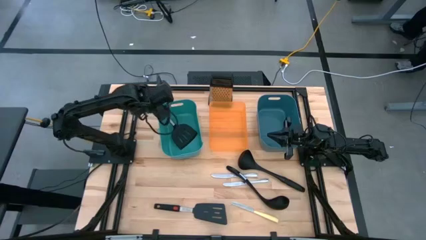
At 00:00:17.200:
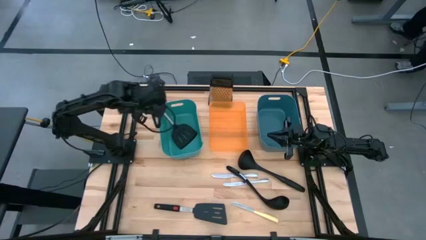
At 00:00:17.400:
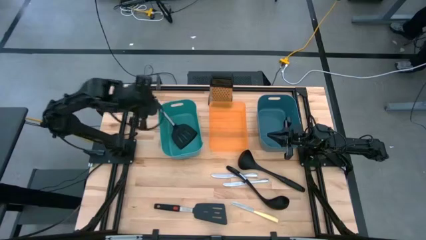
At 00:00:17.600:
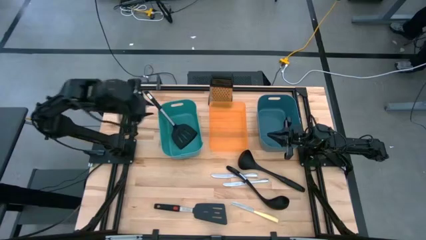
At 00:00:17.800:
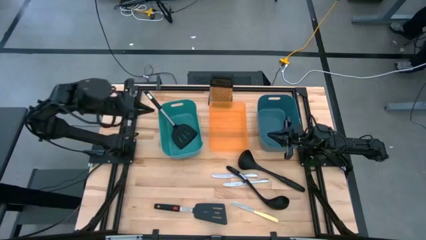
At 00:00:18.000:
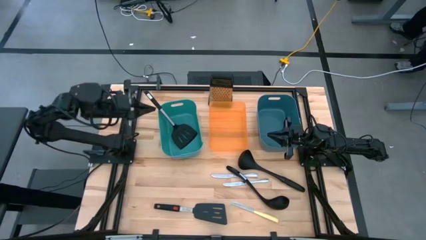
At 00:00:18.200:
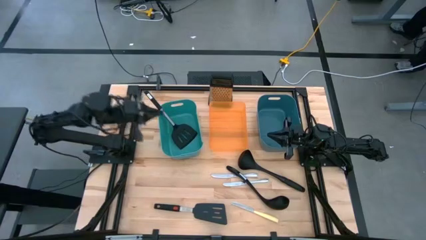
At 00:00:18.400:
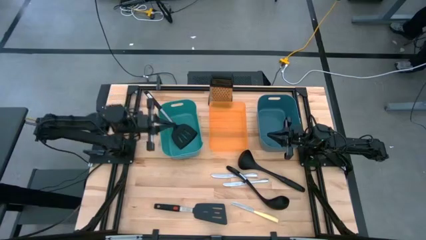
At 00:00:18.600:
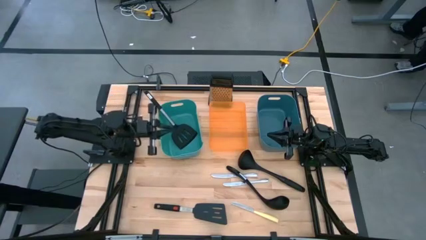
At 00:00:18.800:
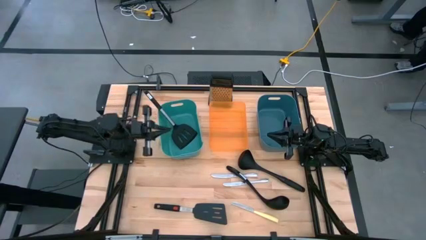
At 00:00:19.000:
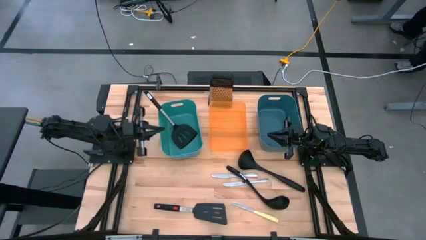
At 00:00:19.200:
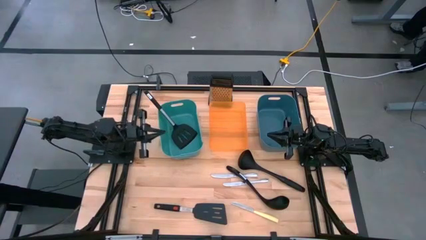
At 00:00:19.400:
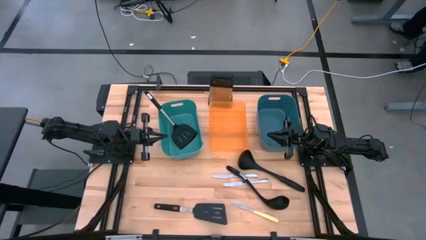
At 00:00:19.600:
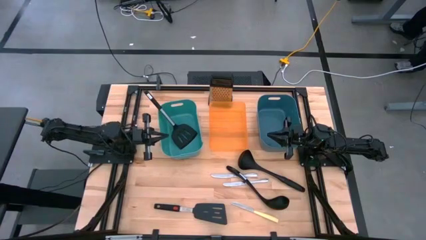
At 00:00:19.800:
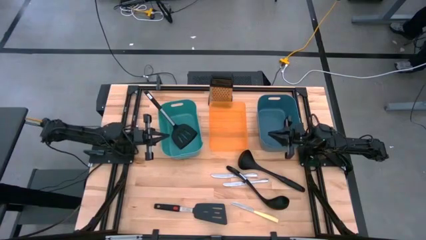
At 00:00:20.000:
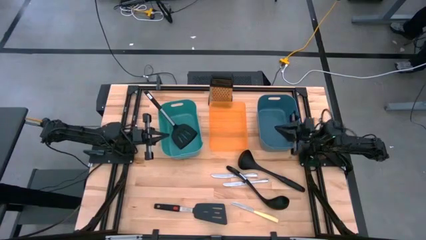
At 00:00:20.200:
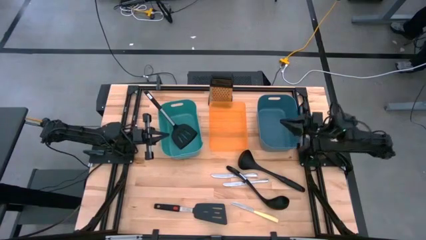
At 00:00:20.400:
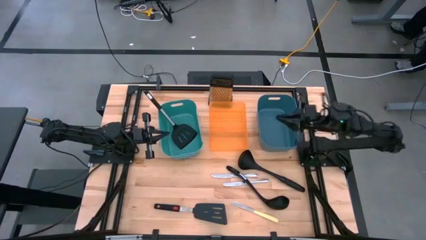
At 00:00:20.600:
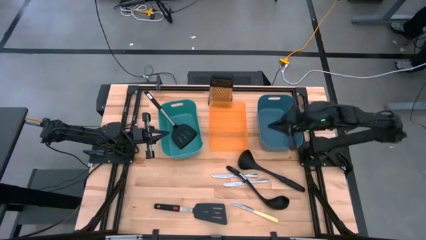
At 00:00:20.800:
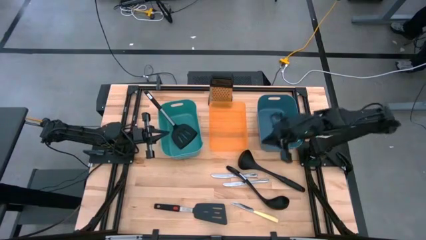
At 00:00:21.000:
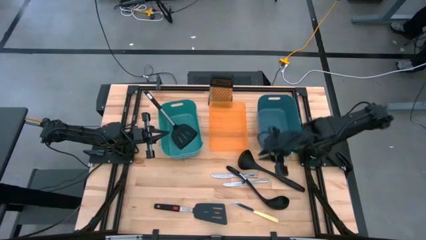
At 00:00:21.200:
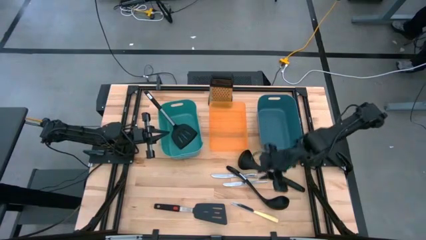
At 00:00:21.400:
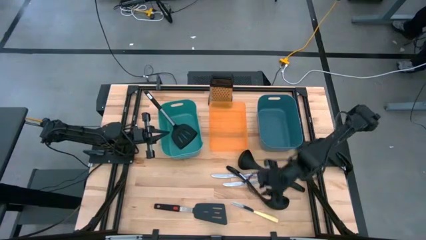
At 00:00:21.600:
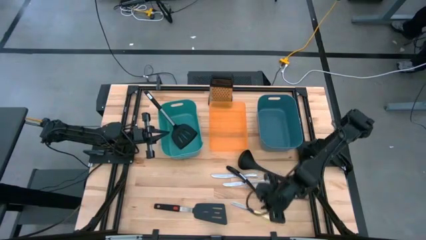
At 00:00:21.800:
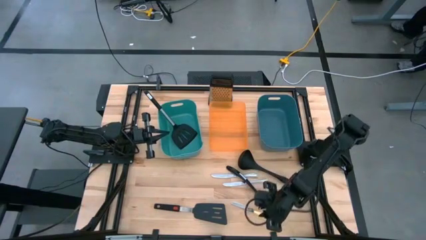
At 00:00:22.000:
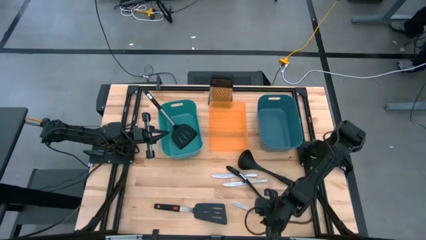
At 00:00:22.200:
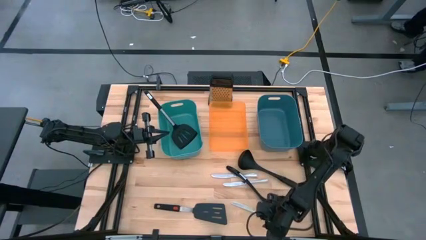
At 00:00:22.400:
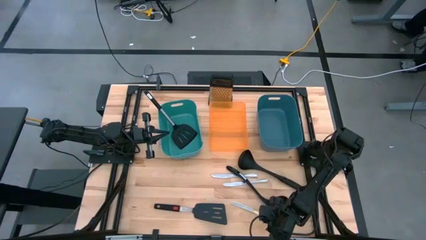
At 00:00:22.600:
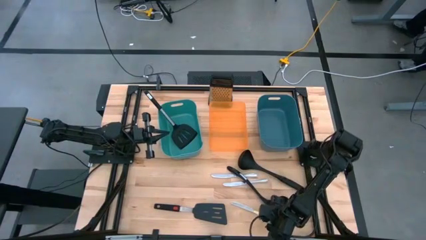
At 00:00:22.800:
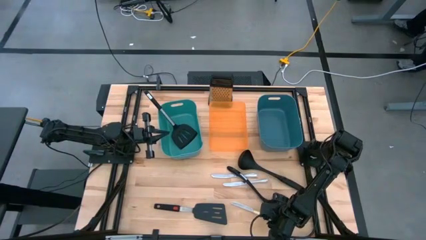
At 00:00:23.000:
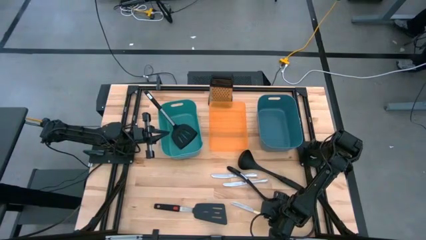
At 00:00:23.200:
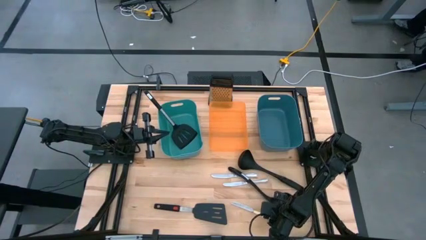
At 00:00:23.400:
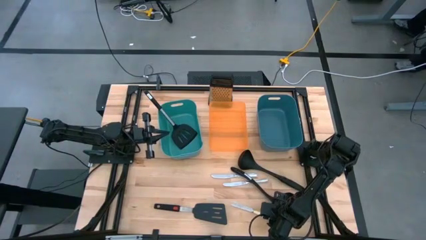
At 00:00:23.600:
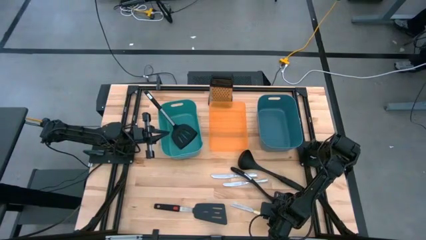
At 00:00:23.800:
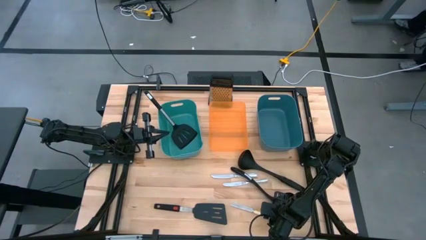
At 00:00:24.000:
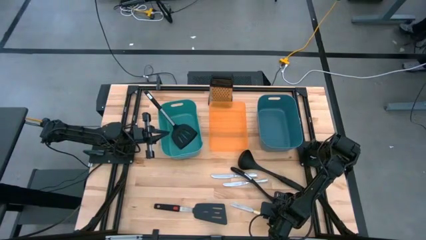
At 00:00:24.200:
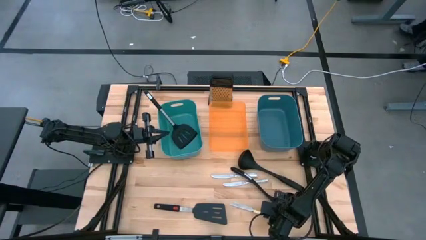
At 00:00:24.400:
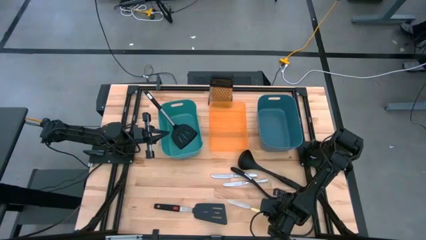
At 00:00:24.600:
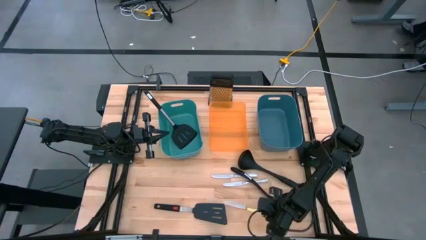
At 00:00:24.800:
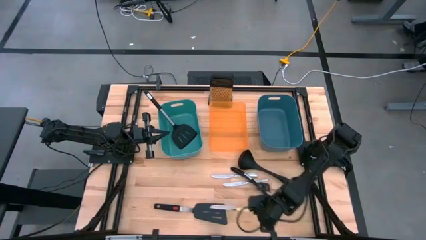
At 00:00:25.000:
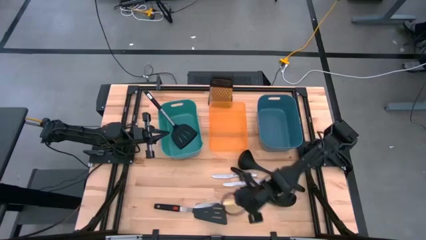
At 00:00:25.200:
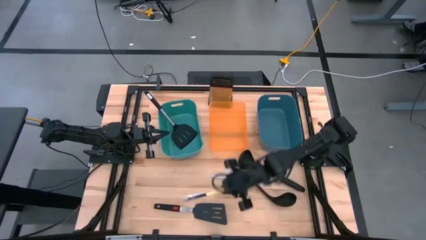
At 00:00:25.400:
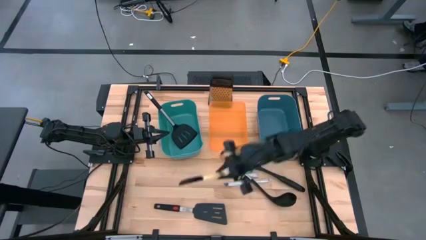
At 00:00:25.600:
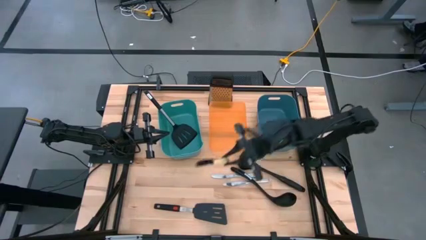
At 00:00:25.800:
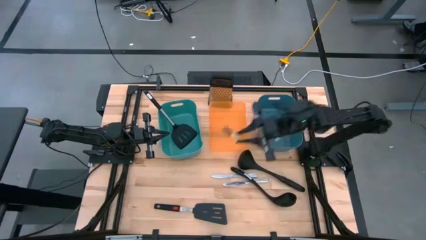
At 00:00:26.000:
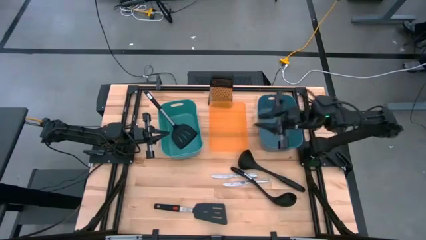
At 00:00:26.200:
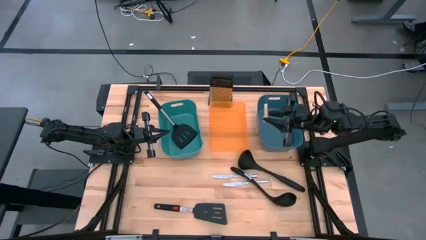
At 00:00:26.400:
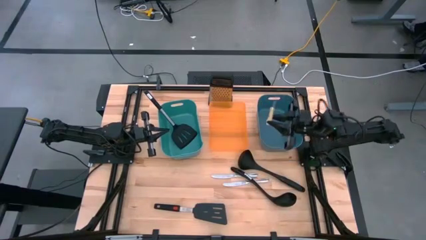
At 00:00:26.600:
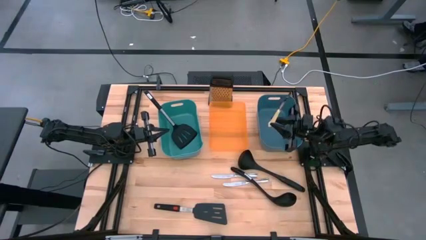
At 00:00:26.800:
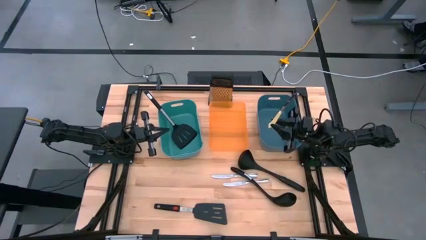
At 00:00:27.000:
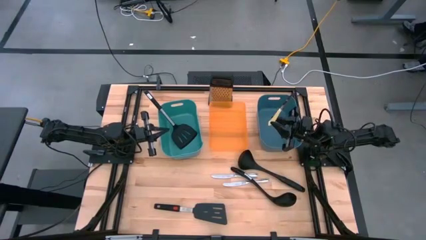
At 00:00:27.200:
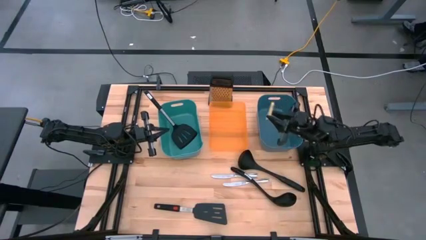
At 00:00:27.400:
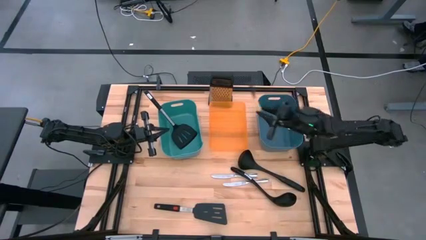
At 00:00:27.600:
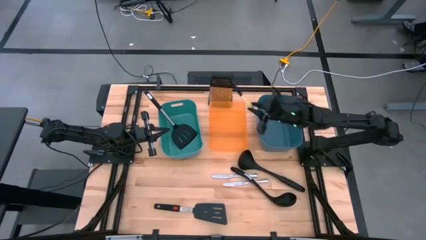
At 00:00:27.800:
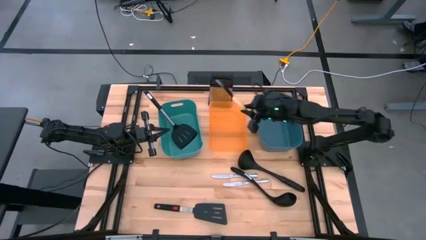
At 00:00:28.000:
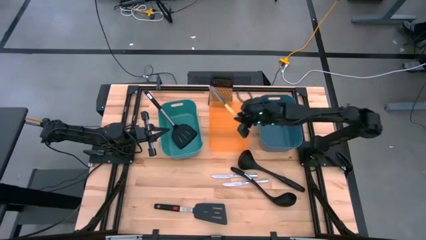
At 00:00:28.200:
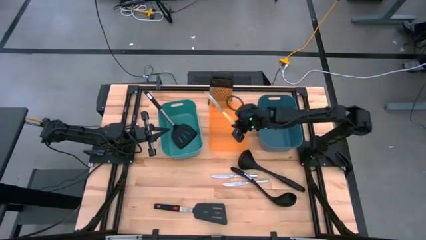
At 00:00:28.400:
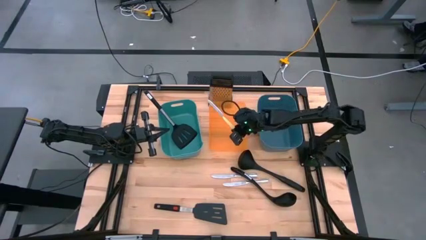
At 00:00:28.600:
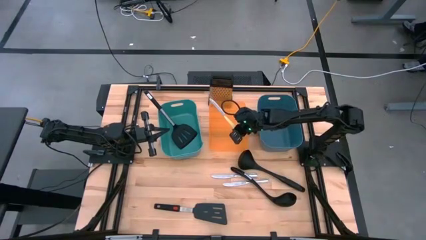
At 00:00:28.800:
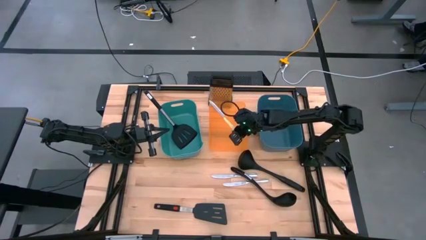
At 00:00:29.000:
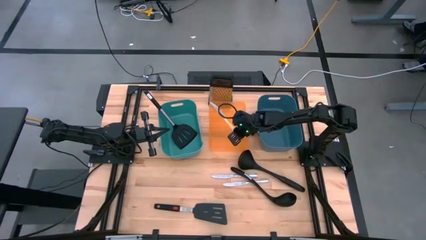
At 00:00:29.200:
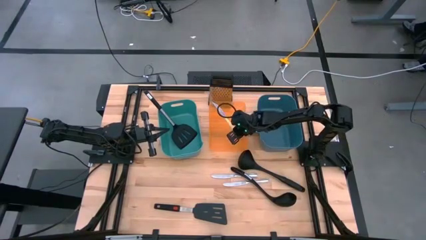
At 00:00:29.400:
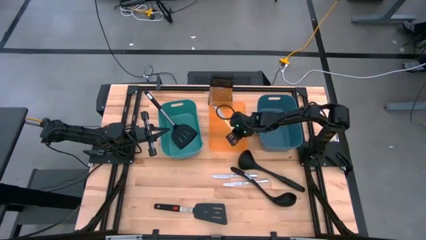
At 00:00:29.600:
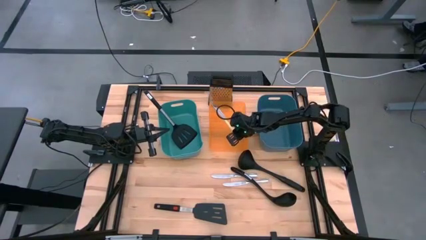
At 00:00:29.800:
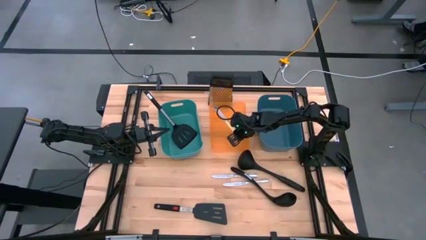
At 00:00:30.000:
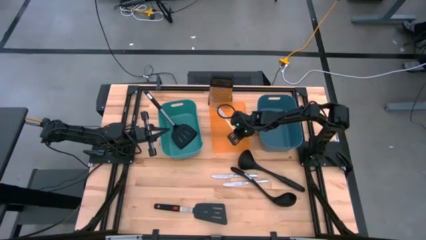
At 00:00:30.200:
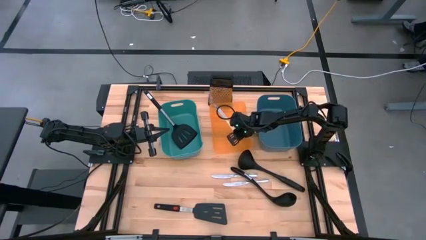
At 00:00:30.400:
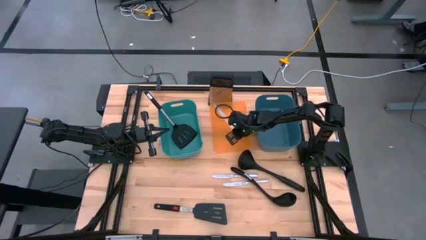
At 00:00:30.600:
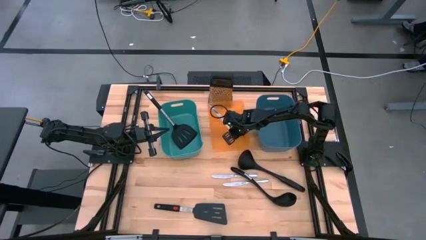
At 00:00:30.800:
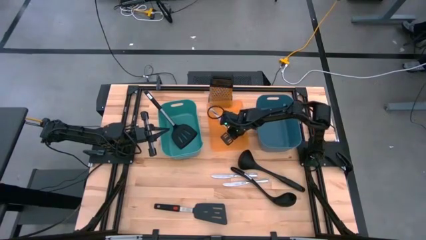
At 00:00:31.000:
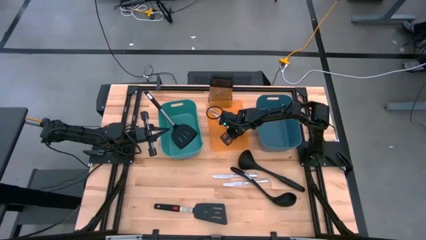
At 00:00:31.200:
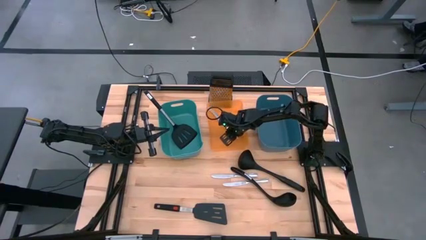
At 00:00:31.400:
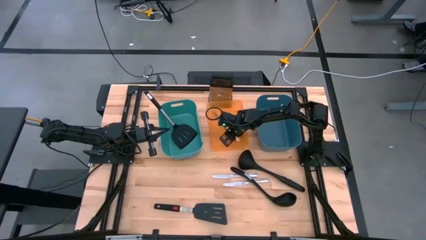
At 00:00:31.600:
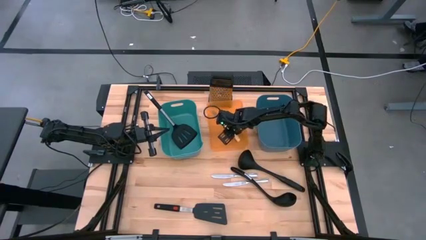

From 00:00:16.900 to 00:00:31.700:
Task: Pick & Place Kitchen Items
Put the yellow table knife into the orange bin
